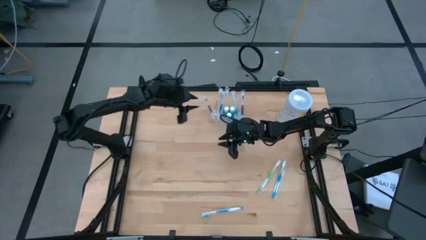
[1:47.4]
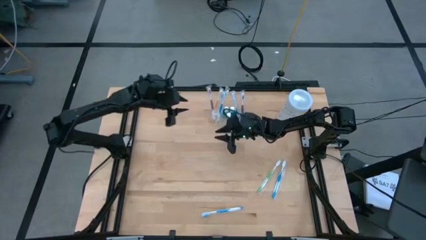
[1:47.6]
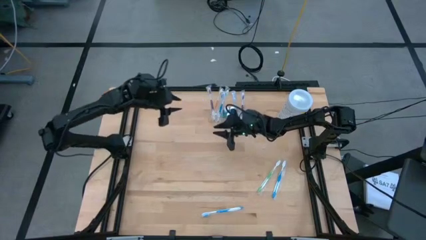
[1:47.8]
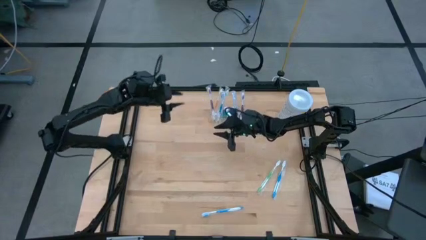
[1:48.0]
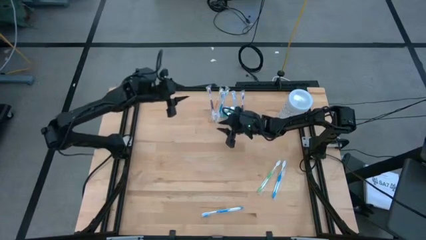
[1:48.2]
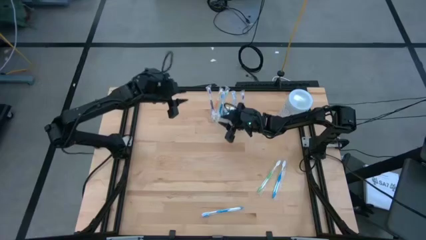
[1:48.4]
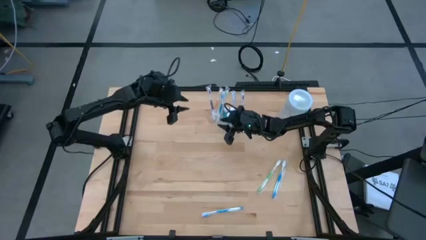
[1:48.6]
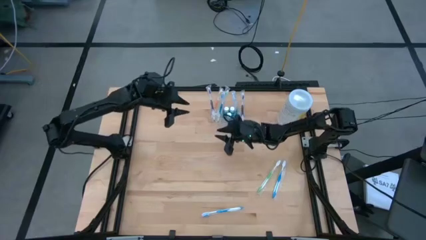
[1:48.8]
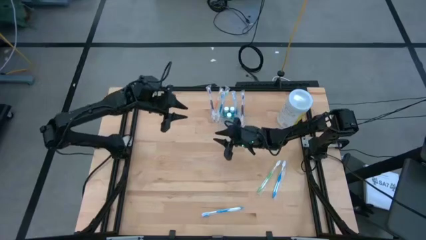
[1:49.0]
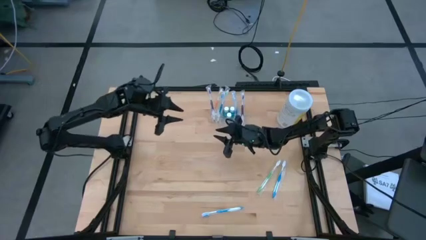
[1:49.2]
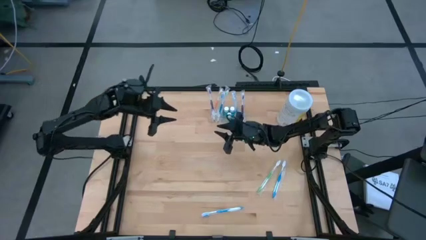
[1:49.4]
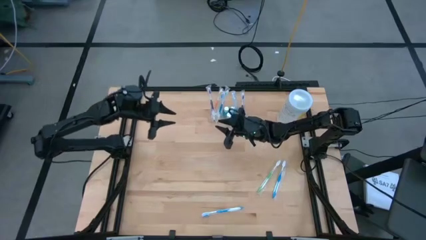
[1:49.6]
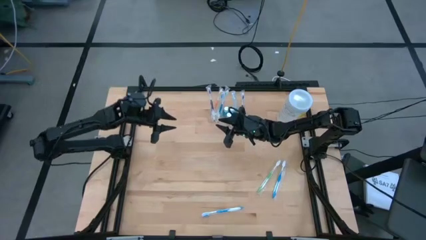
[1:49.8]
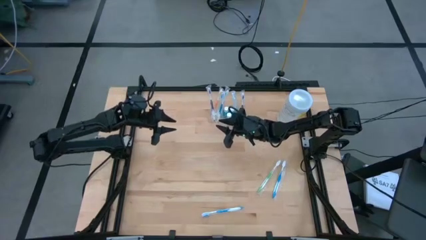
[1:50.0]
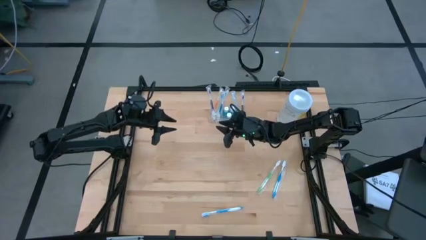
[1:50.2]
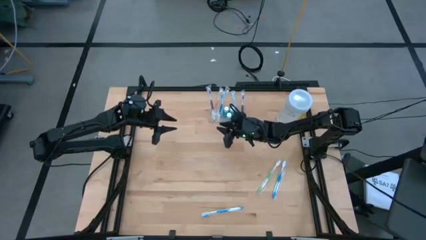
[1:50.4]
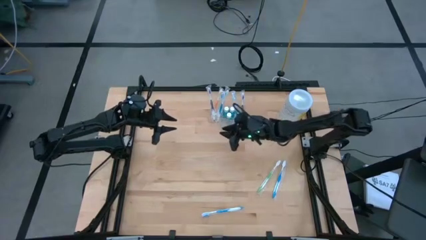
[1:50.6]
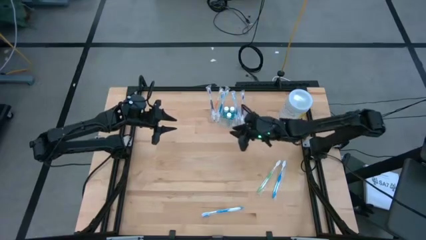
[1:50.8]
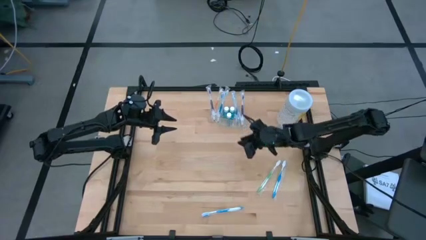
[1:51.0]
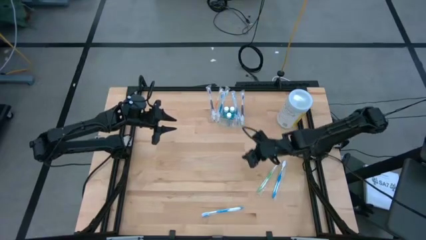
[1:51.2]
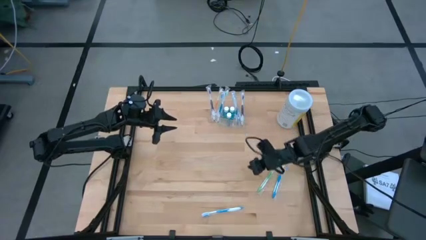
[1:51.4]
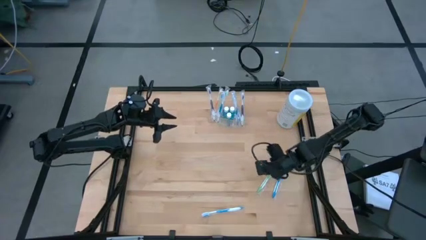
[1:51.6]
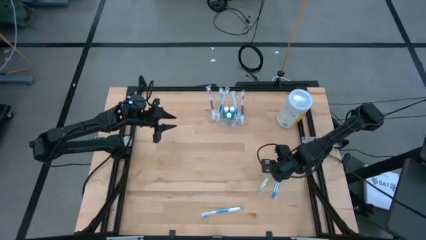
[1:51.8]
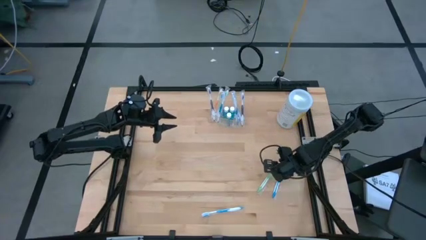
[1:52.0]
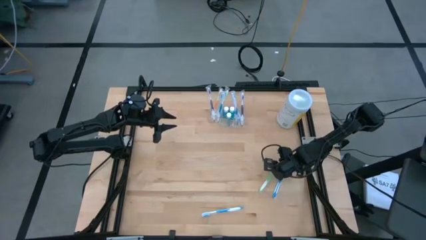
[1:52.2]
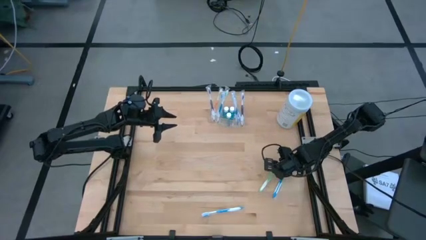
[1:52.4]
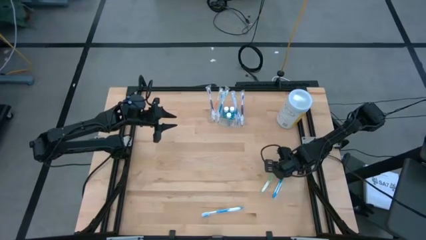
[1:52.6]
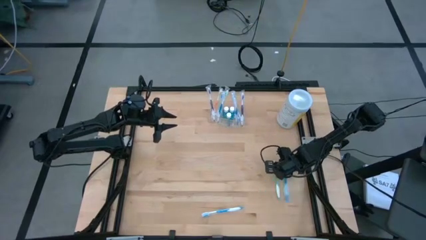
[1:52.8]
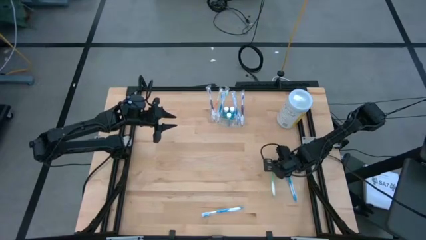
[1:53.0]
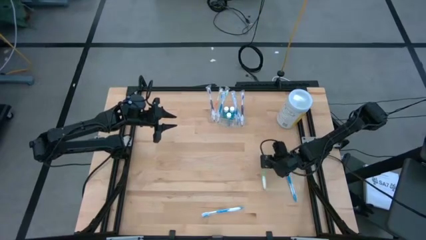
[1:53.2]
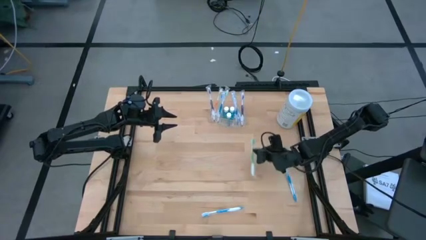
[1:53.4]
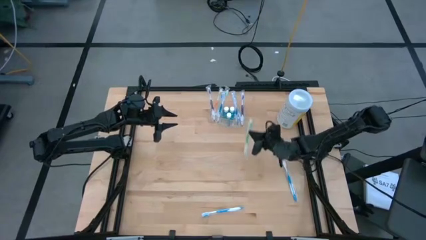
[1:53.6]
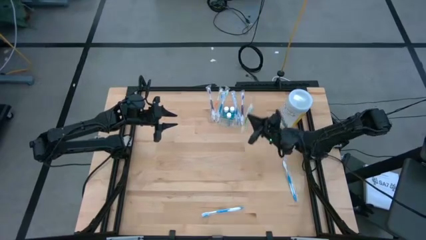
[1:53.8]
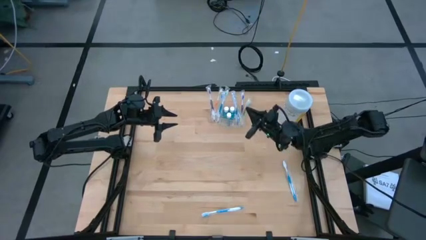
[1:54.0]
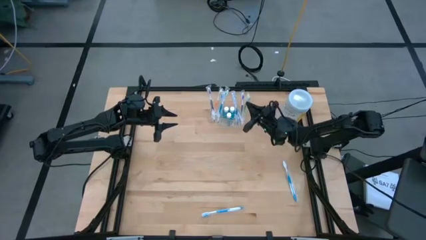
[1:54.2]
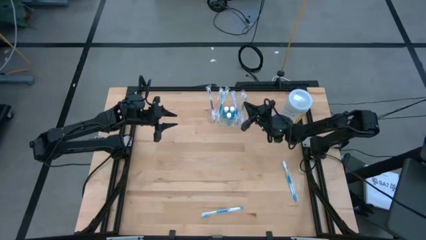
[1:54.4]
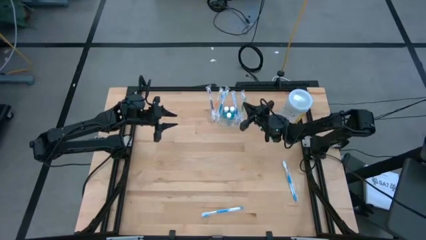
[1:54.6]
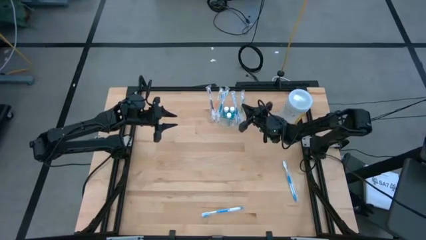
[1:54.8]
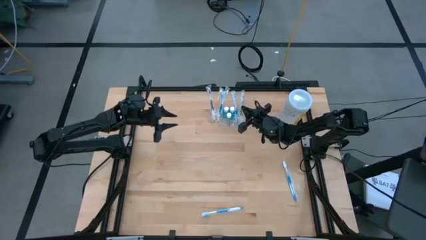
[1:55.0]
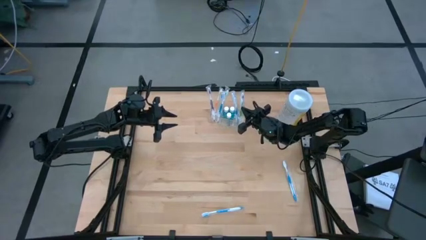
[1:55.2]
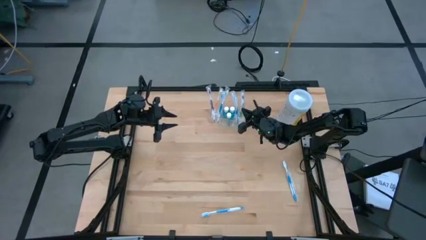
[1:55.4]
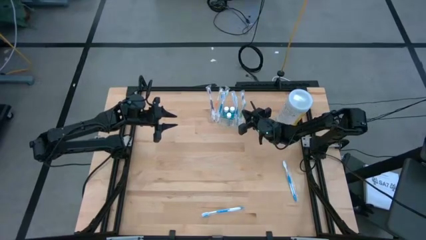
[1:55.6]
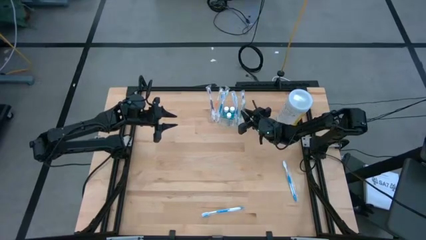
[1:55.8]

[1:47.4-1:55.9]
Task: Pick & Place toothbrushing station
Put the green toothbrush into the right section of the transparent organizer

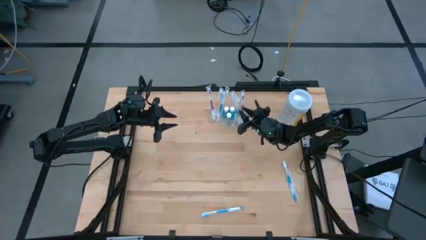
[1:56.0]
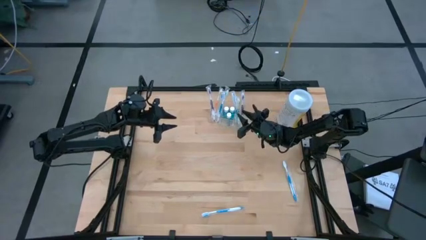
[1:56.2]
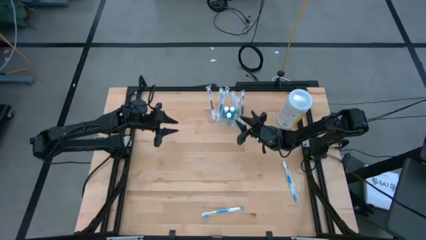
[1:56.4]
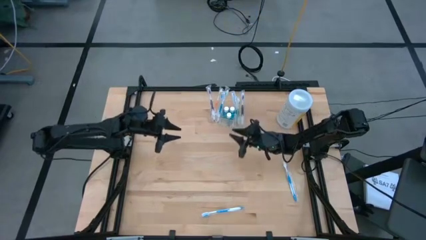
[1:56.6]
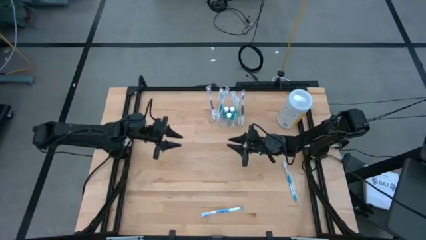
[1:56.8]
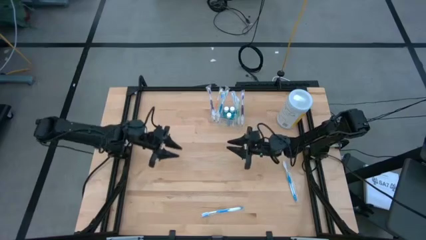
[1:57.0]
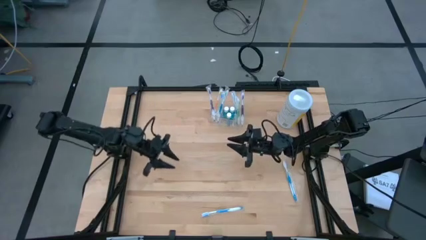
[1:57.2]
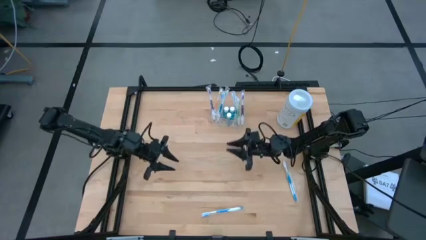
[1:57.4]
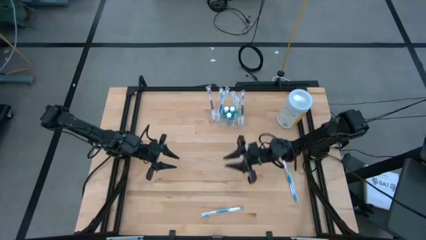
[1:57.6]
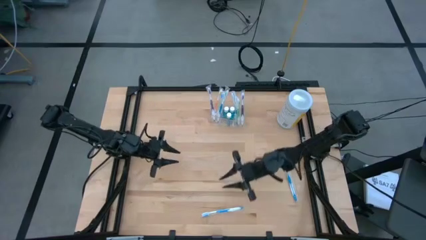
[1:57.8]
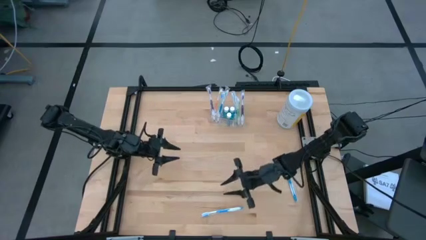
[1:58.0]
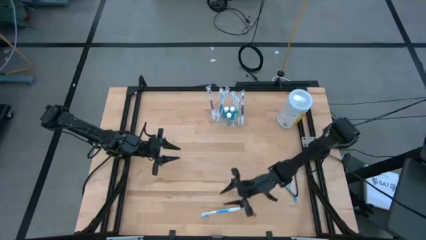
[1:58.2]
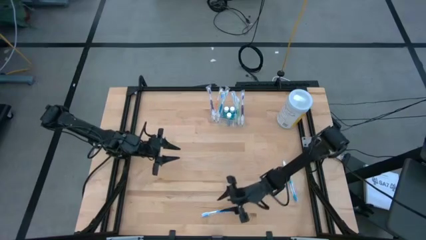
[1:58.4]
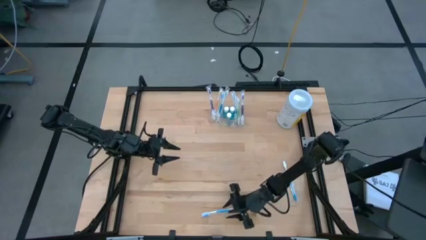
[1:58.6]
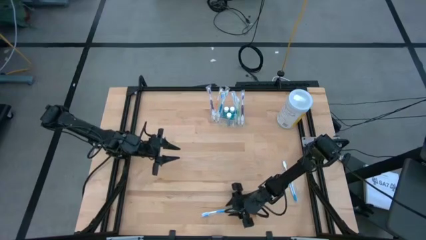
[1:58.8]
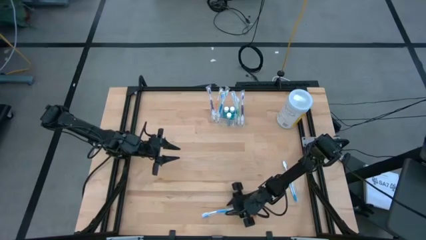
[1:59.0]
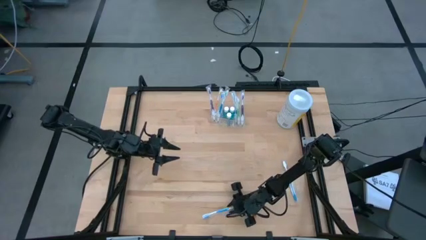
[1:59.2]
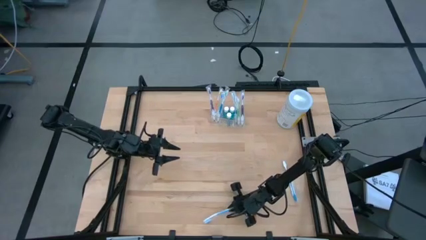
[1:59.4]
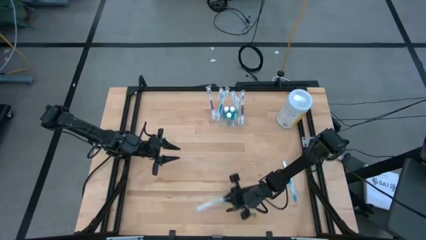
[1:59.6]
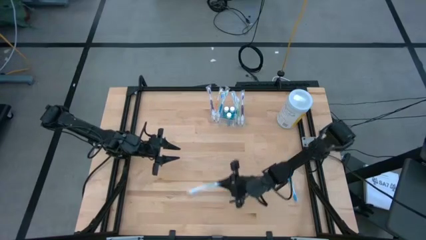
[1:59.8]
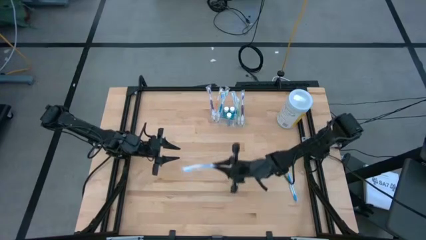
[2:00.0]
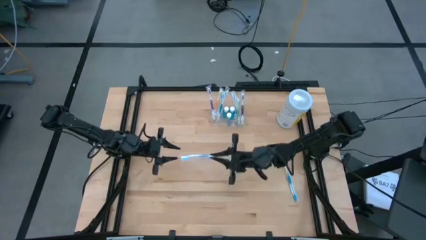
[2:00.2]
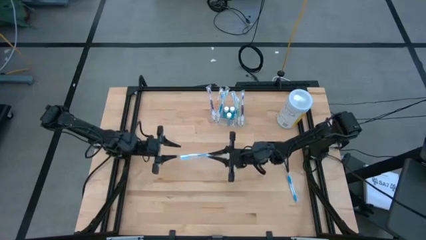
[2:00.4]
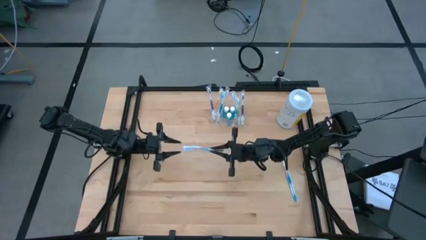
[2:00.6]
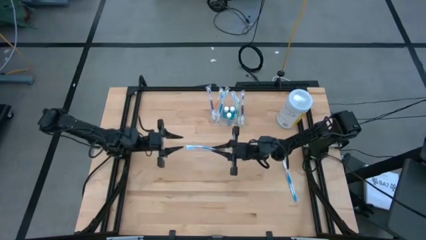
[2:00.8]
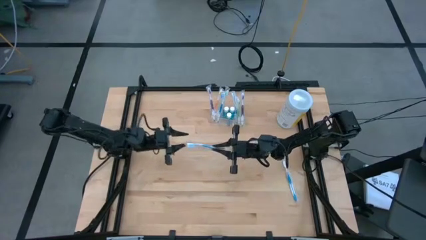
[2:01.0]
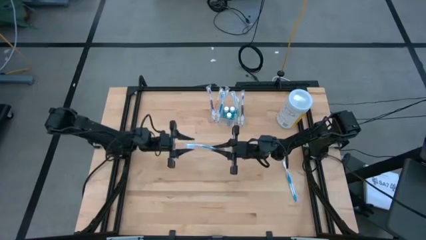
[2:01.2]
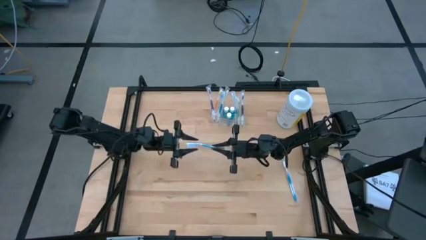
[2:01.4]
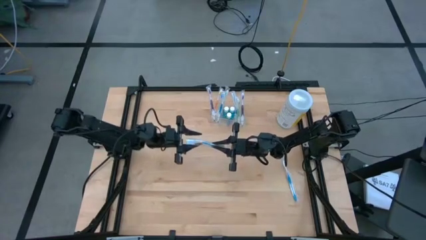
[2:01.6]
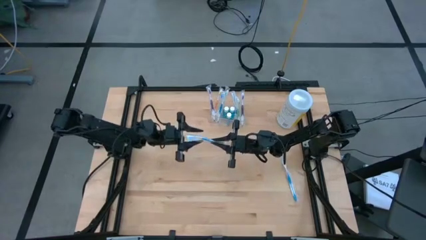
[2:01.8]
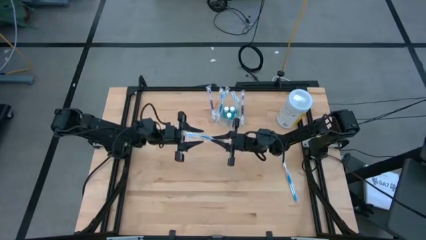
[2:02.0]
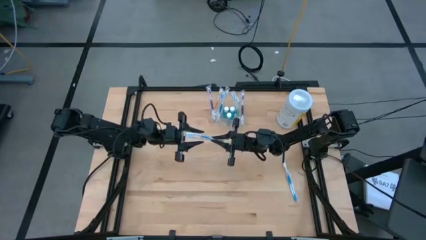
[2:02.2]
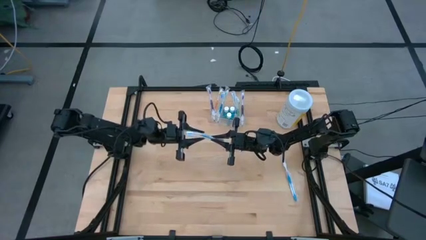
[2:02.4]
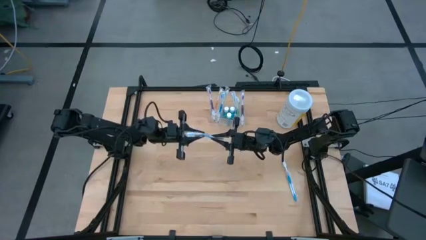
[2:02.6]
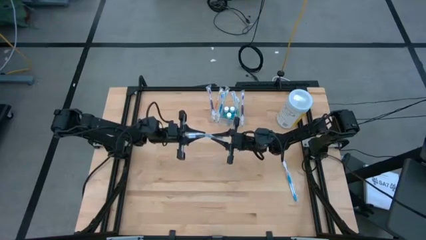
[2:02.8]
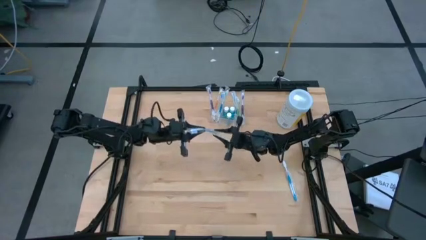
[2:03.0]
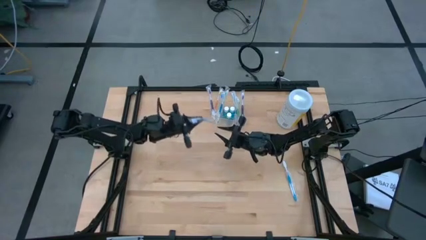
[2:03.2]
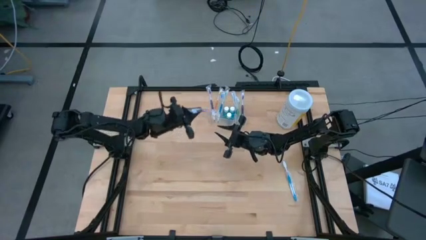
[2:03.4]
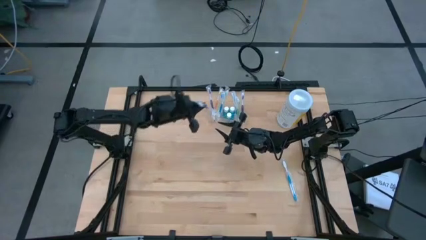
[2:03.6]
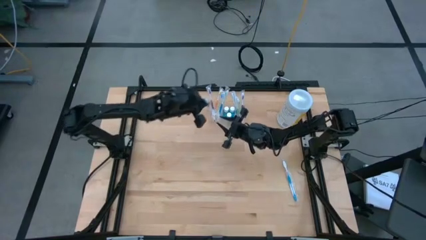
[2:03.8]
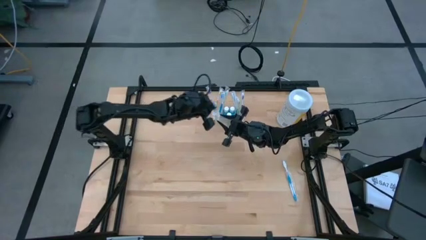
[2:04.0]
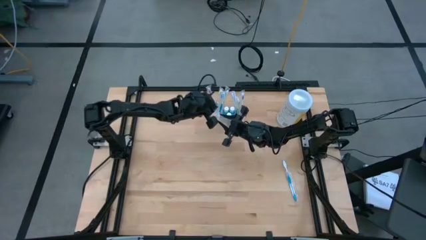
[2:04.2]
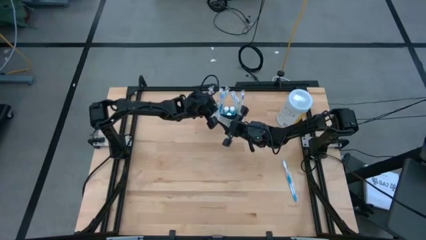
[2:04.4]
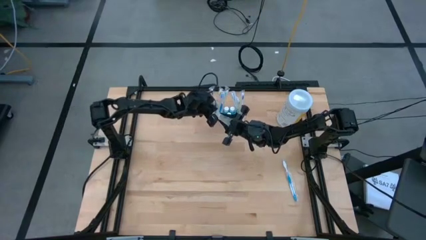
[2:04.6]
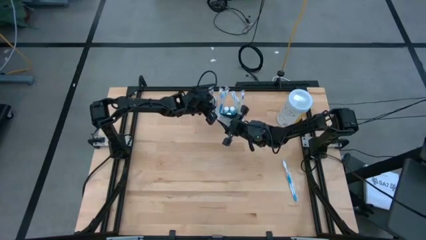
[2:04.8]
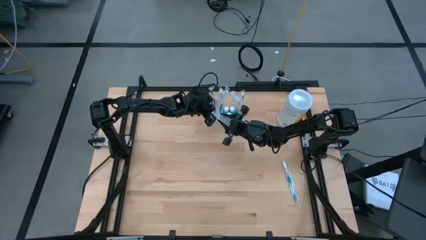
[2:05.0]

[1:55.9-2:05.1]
Put the bottom blue toothbrush into the left section of the transparent organizer
